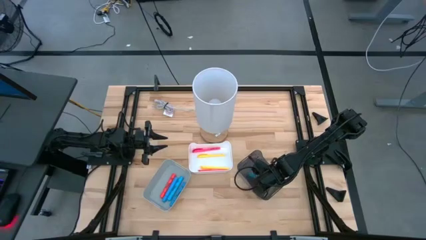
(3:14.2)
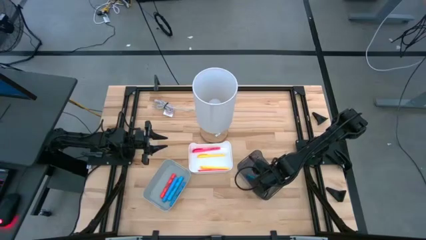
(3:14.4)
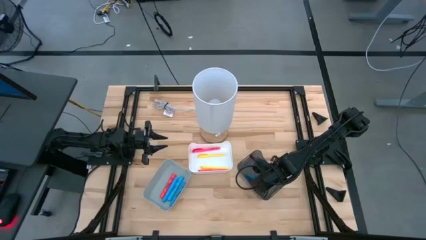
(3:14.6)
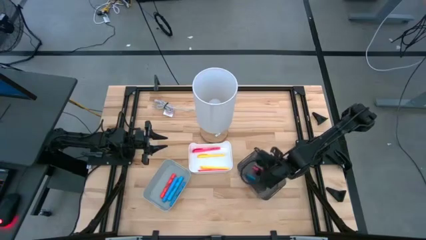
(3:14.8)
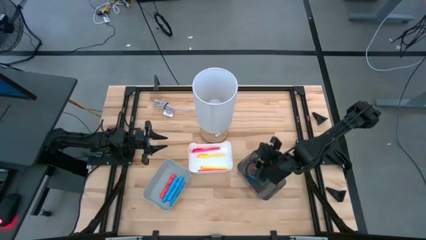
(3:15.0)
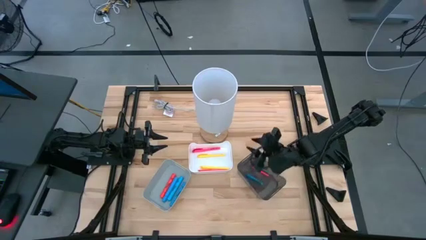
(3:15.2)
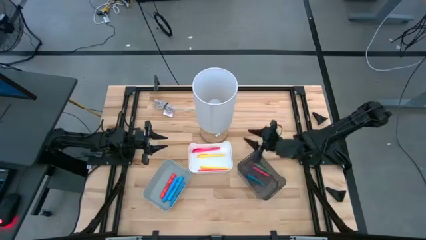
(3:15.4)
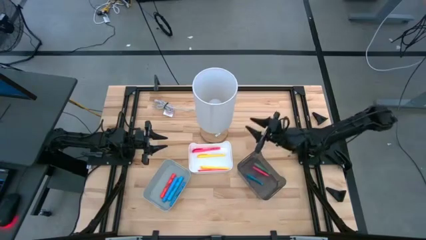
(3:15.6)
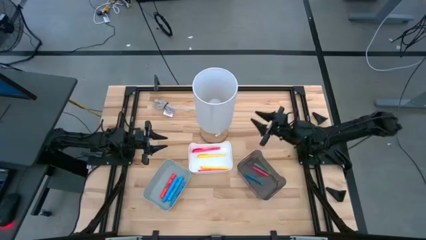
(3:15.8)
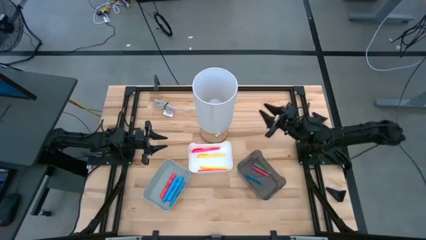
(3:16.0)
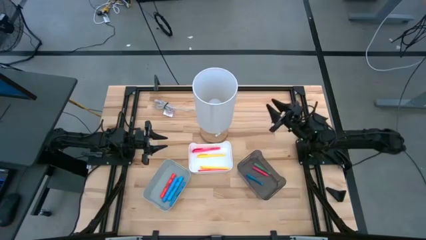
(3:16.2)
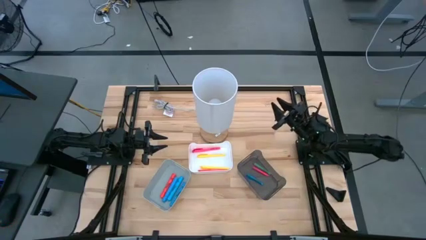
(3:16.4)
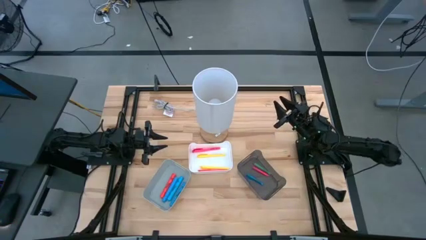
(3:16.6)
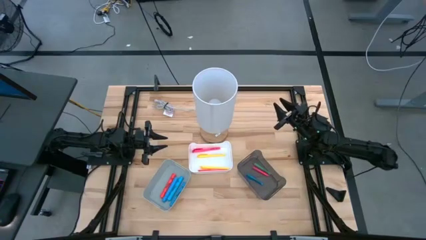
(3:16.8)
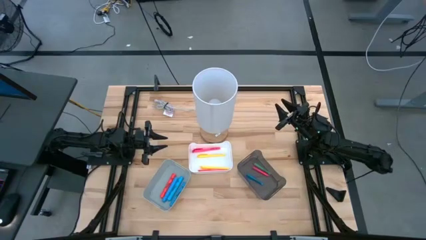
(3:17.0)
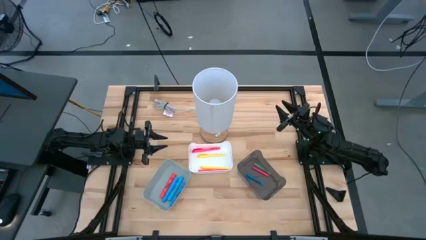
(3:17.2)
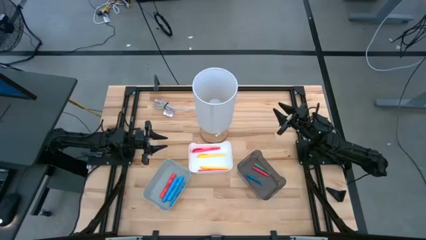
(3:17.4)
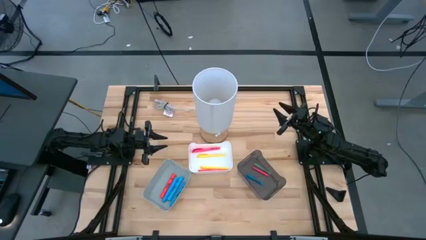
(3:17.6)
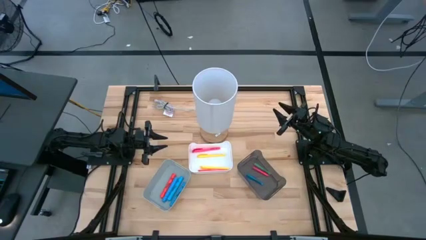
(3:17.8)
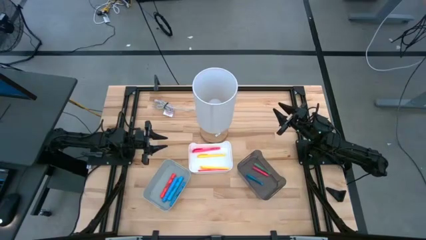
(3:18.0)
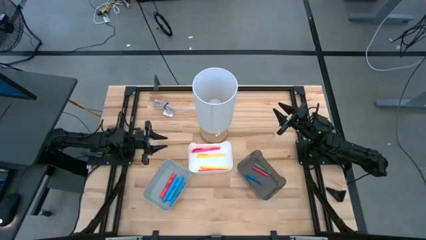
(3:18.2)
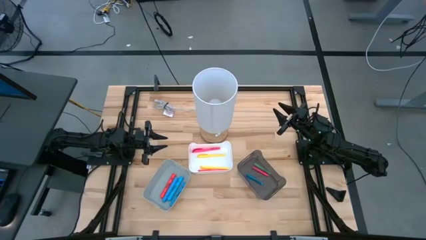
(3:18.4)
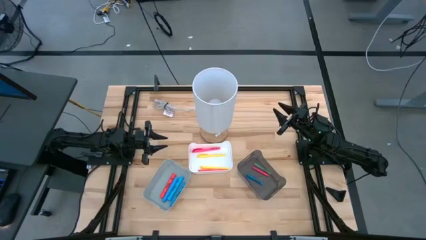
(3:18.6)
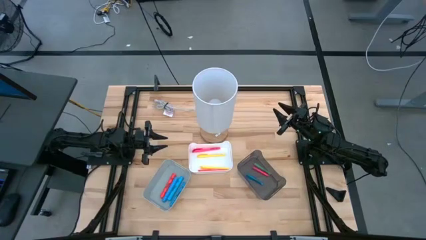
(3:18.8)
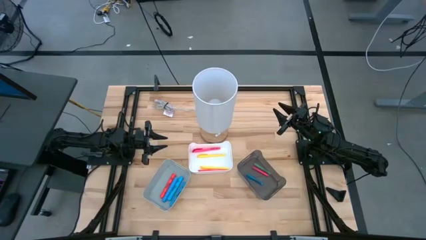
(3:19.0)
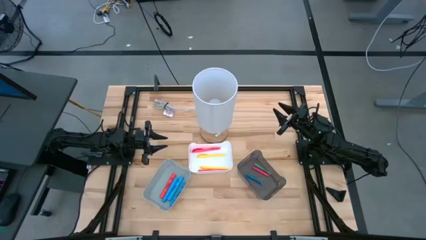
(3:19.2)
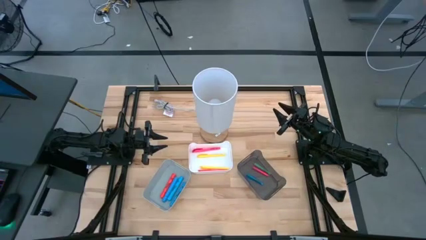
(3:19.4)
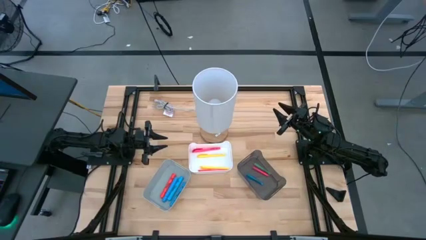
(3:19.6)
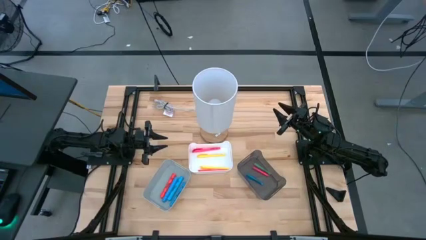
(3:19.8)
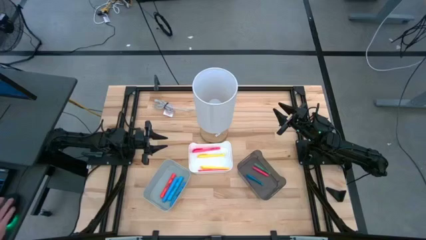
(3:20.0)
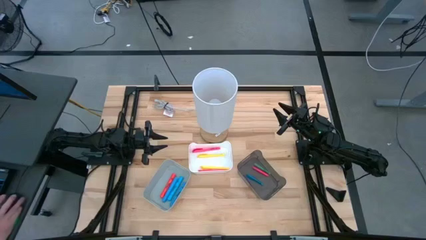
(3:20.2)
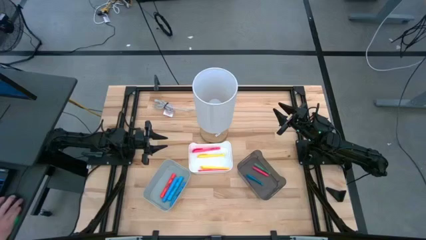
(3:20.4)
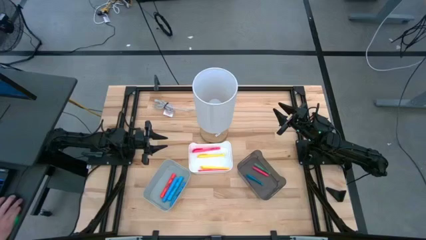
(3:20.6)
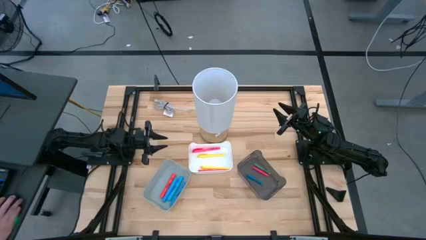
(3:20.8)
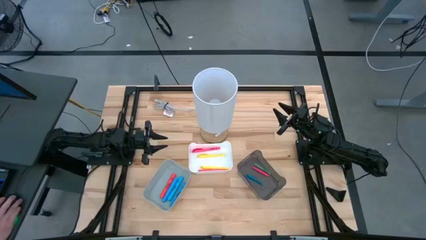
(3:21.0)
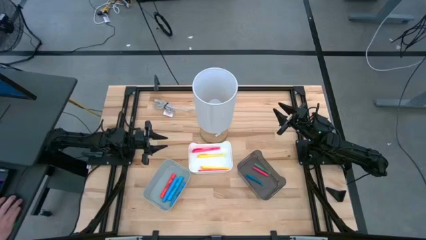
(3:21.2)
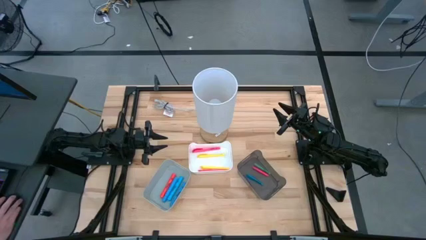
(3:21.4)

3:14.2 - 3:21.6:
Task: Pick & Place Markers
Return to Home Position

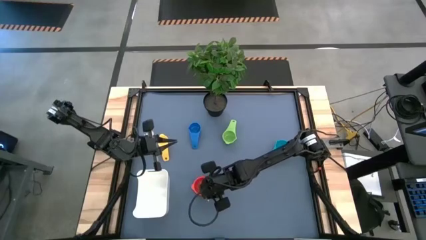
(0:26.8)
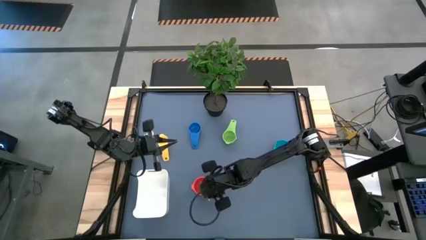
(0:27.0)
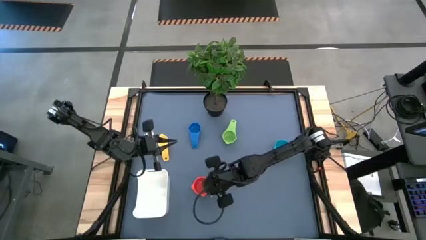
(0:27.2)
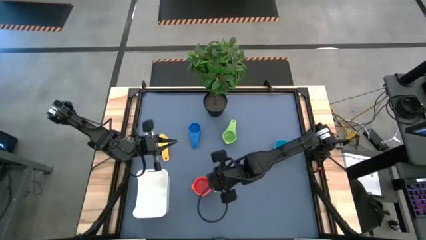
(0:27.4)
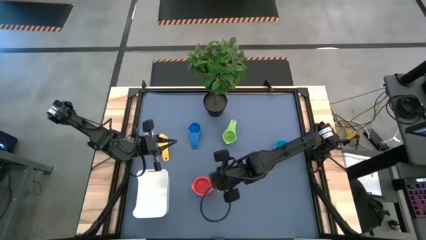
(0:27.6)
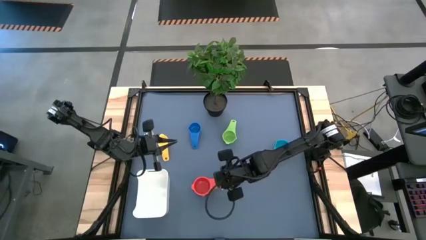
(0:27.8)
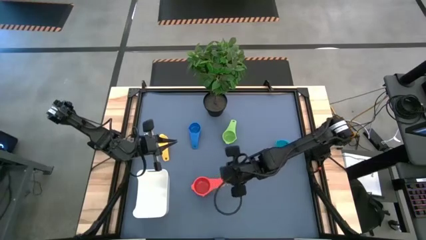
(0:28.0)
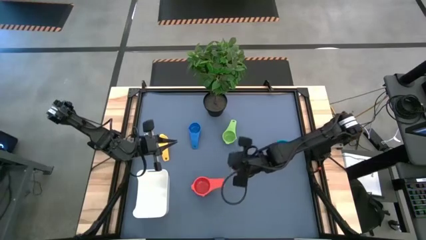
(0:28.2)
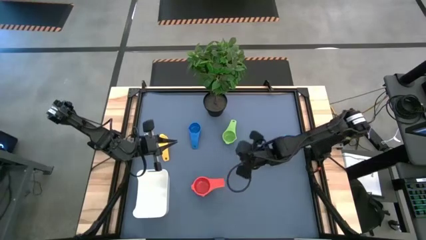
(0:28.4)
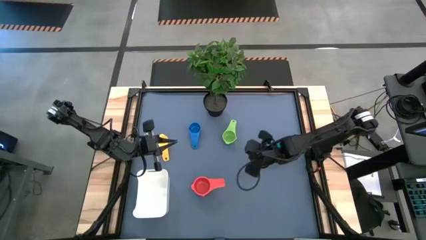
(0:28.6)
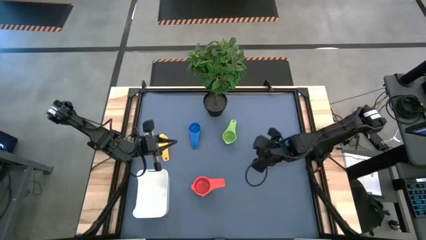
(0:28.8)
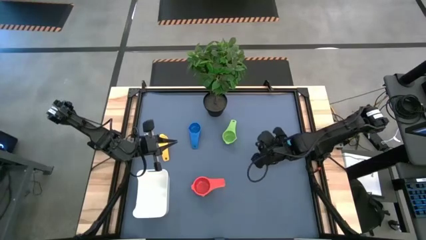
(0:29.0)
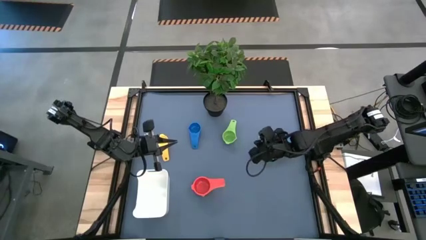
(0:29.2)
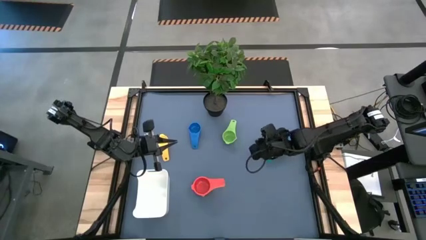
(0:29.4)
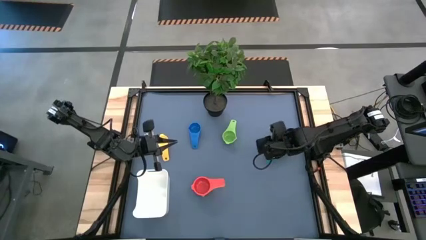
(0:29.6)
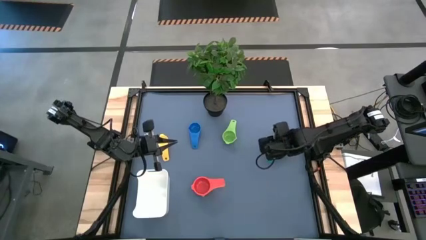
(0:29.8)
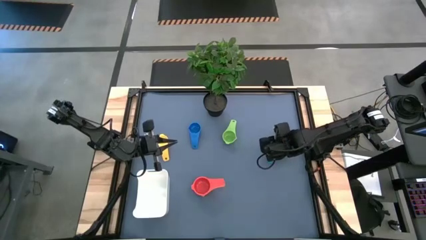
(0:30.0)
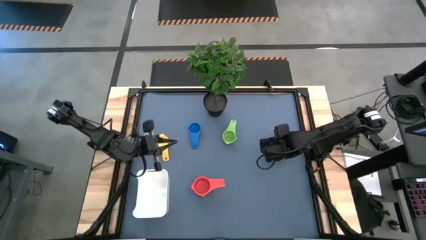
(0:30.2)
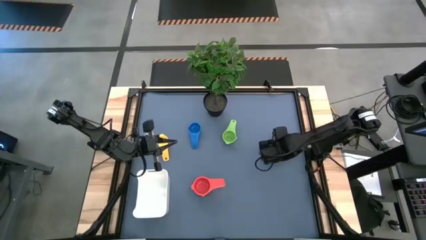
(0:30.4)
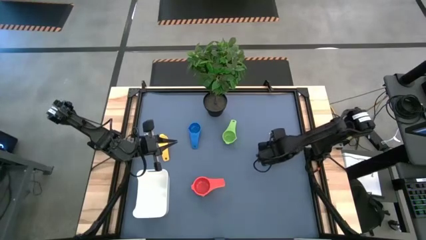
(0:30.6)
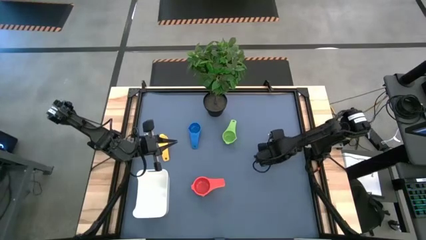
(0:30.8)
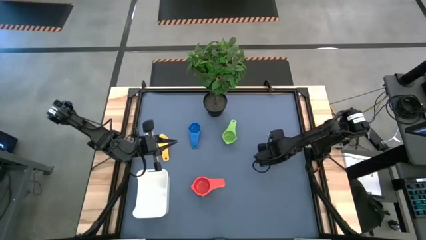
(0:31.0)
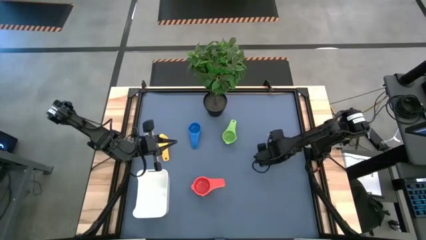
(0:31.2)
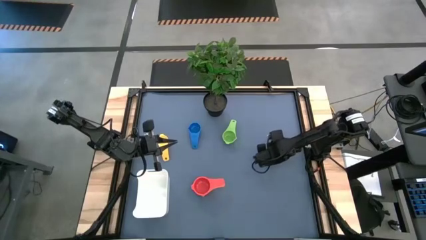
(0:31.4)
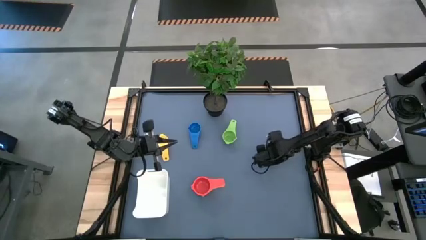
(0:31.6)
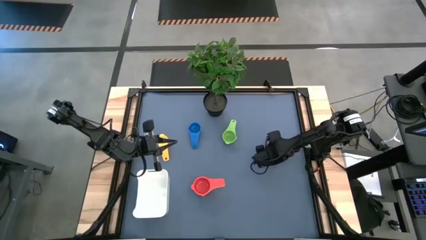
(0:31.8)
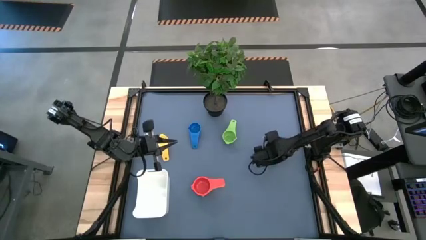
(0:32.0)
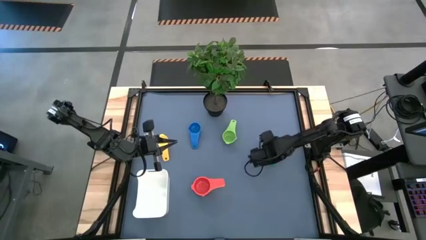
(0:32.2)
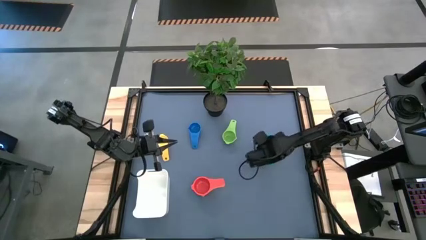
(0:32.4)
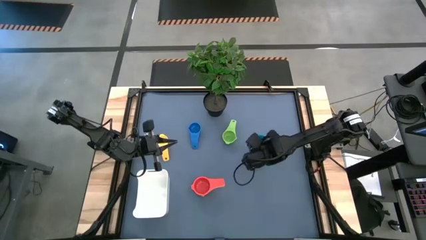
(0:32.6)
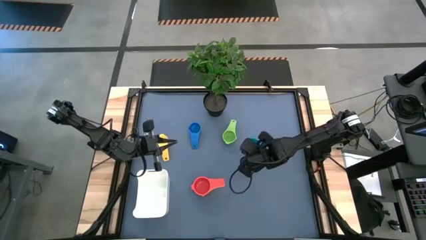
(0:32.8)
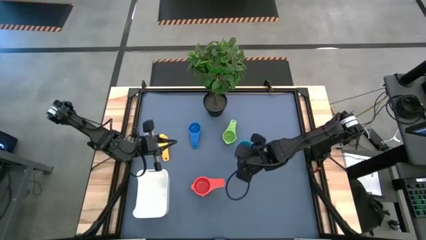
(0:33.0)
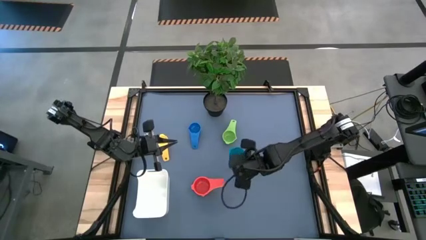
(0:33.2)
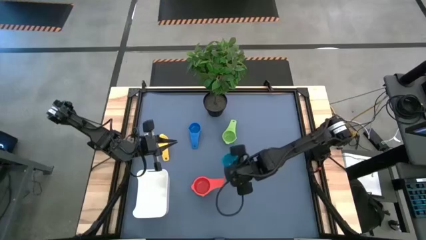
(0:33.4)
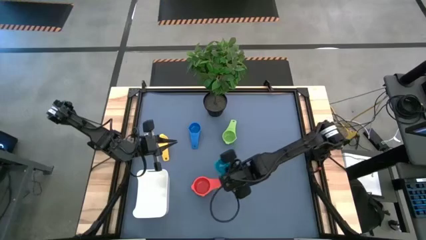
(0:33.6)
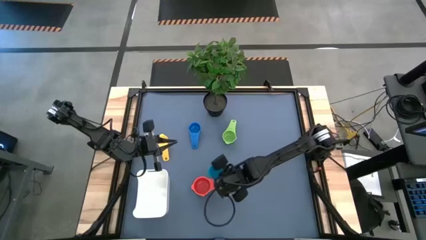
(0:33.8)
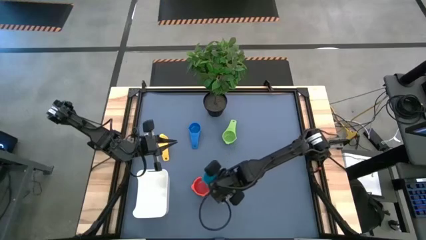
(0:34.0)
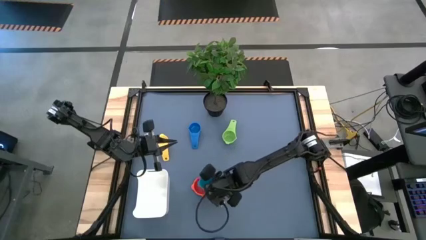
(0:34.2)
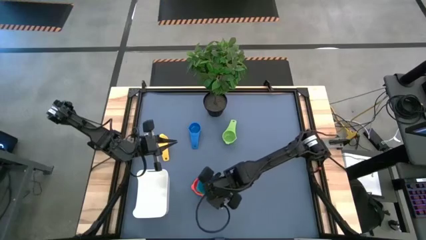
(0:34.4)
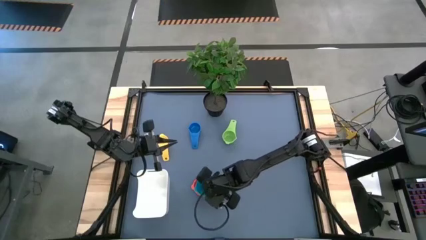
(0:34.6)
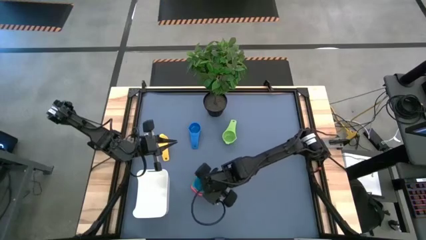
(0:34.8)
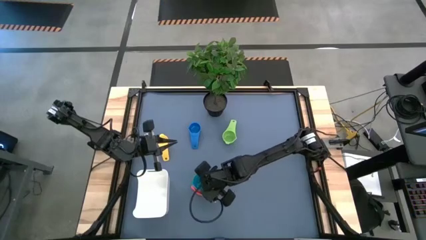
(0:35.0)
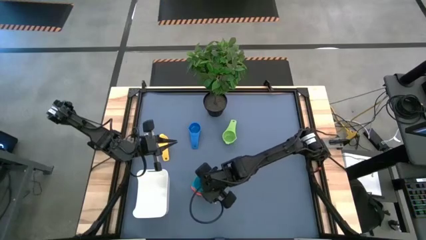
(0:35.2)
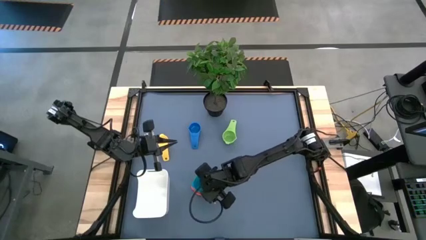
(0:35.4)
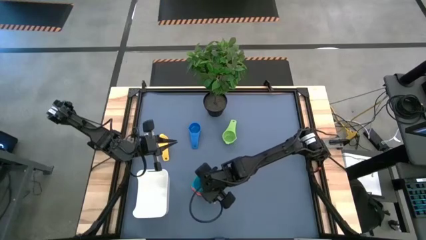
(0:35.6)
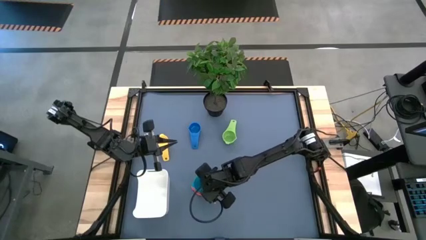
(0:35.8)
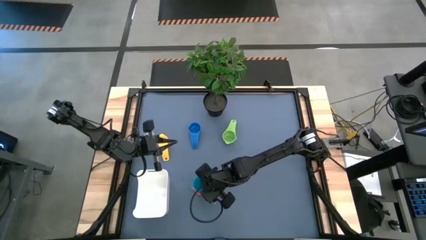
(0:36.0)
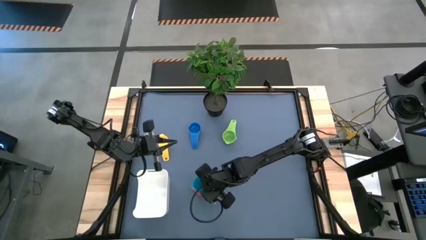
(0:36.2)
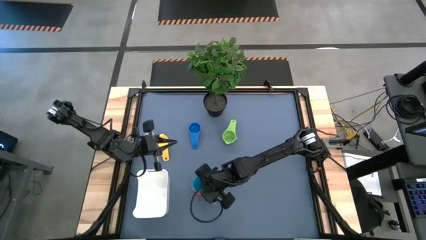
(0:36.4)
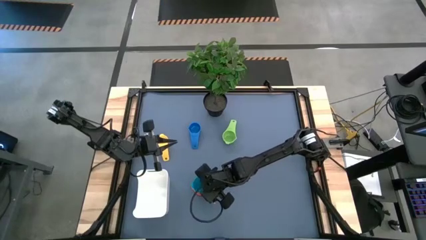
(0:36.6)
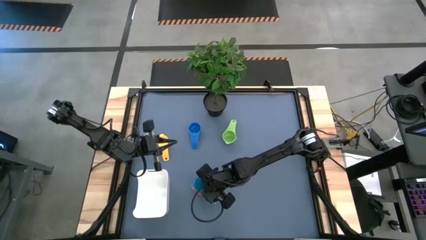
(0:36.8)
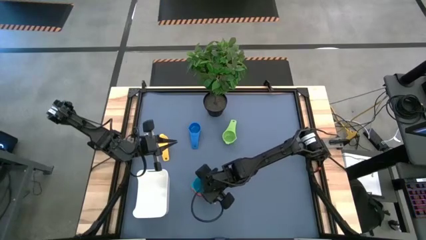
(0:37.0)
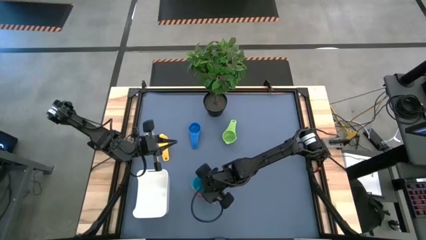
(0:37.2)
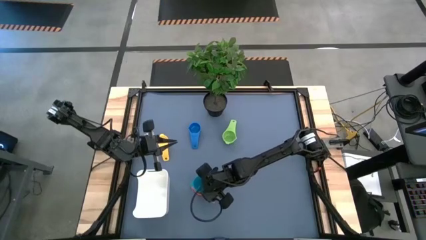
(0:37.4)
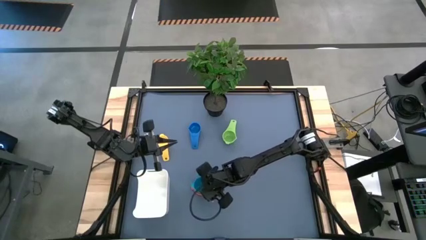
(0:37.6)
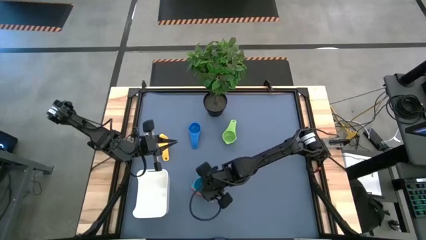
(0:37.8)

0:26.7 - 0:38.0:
Task: Nest measuring cups in basket
Stack the light blue measuring cup on the red measuring cup
